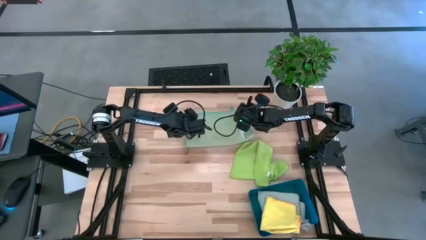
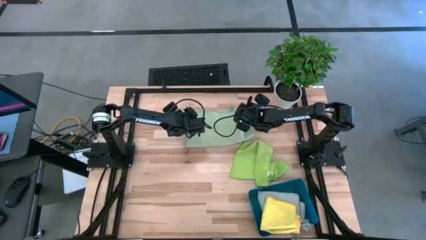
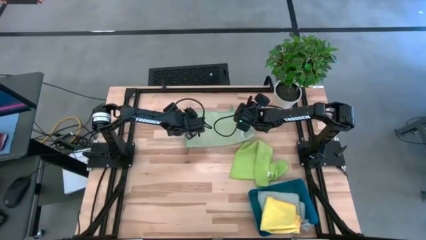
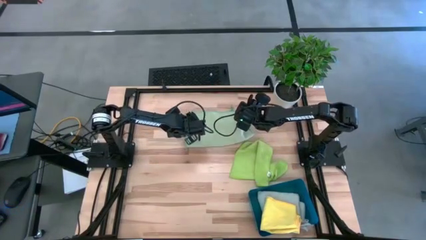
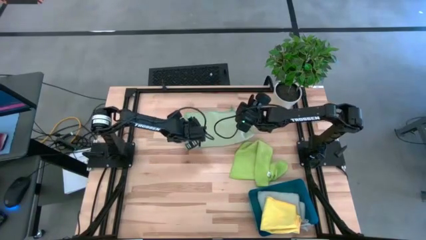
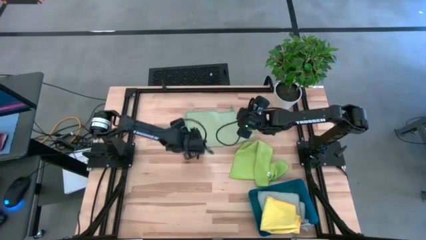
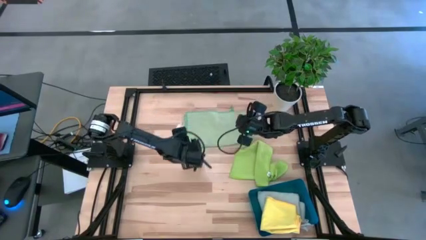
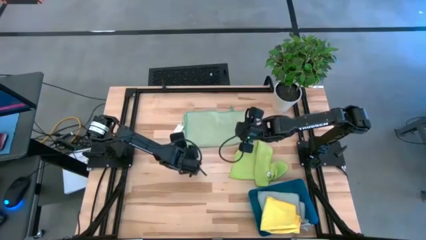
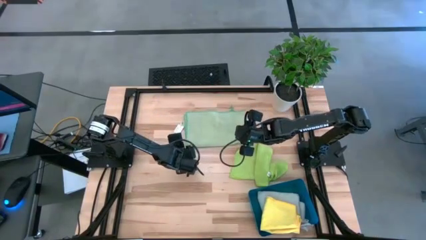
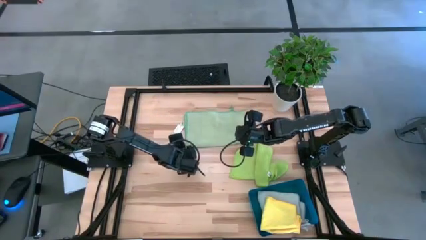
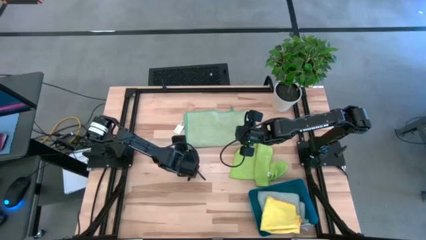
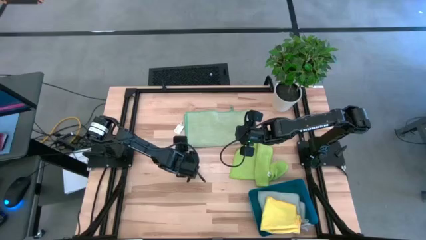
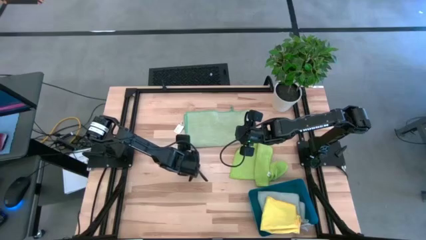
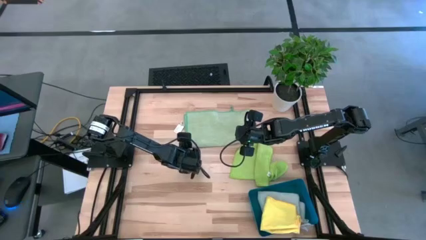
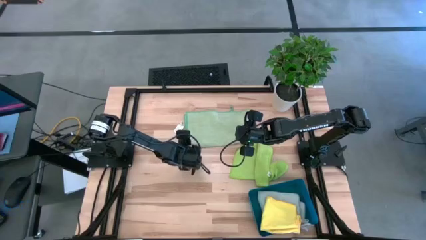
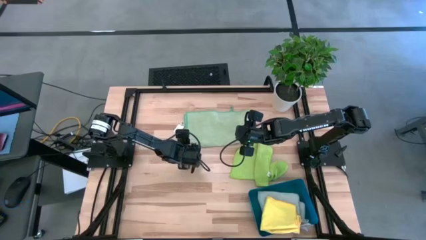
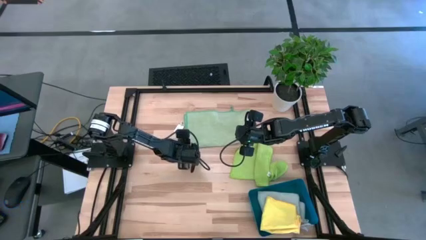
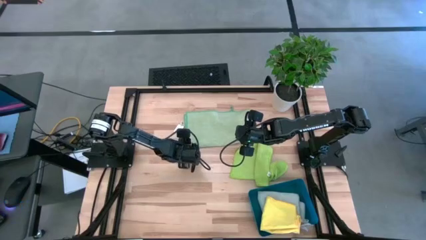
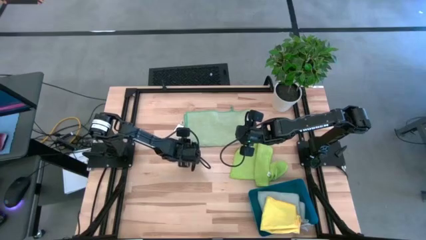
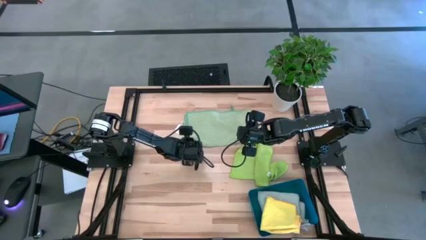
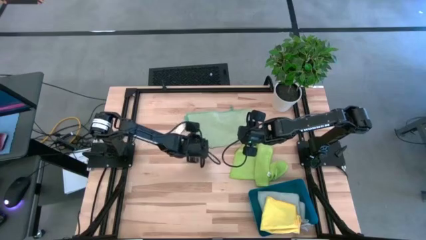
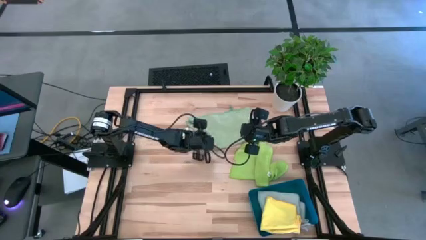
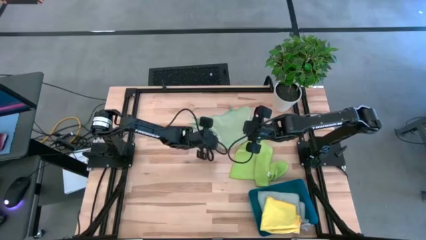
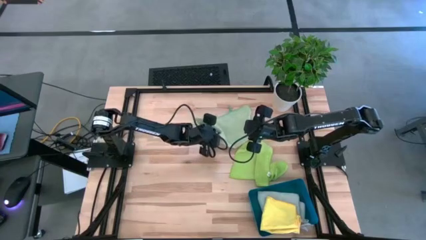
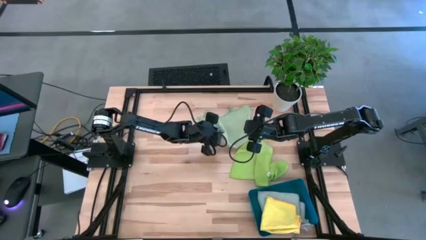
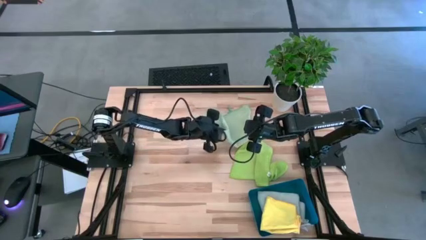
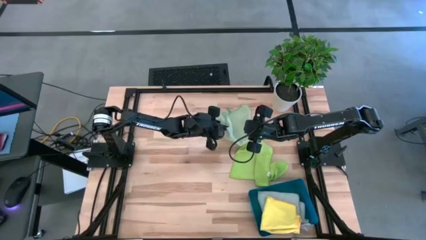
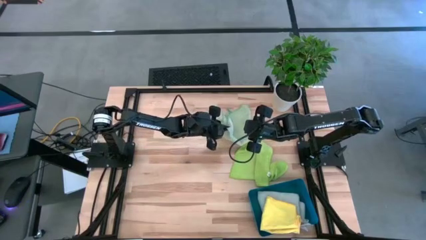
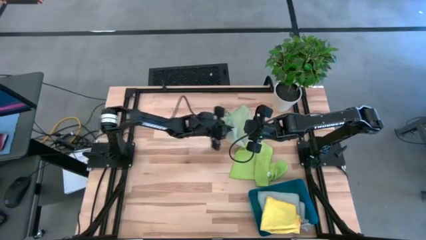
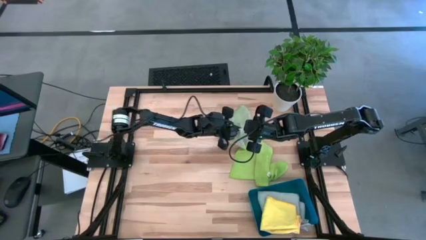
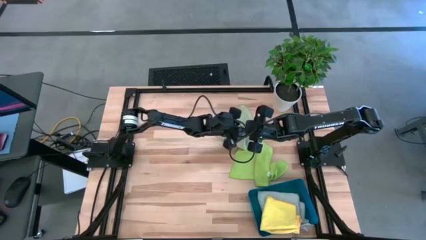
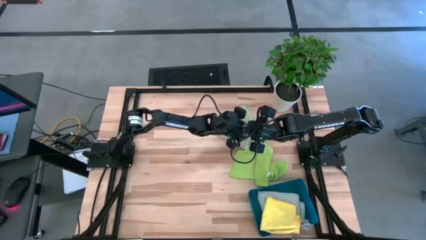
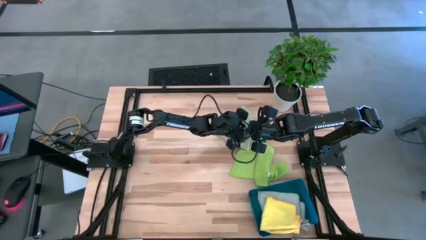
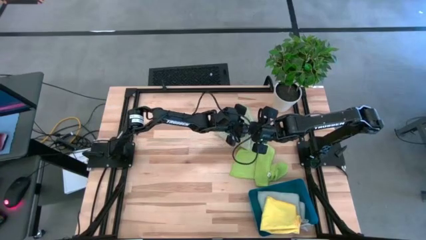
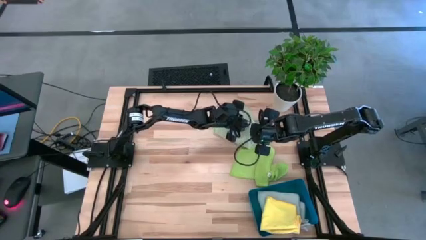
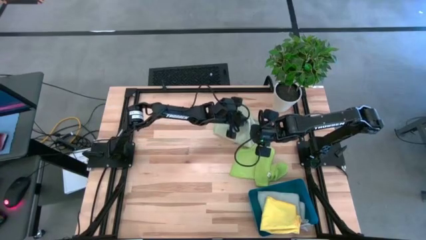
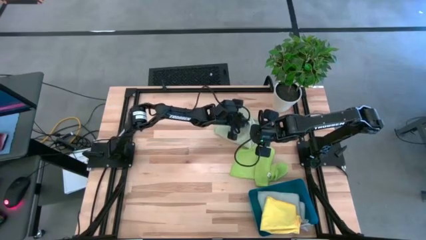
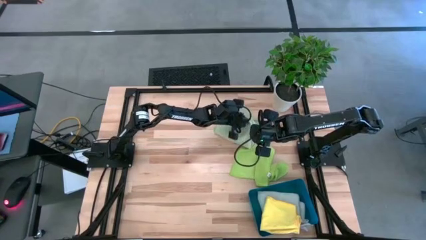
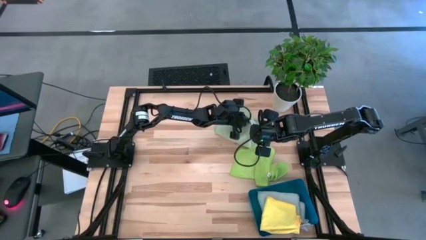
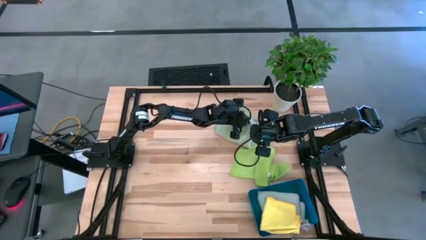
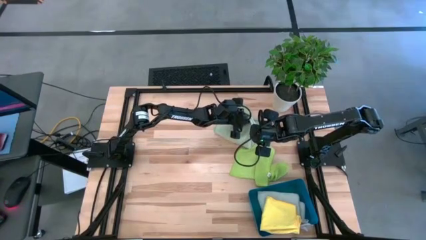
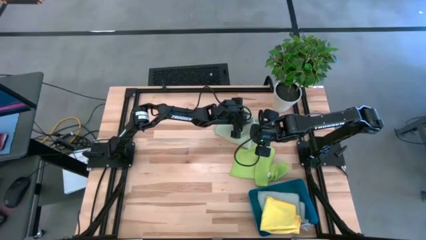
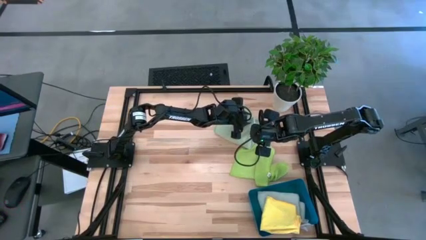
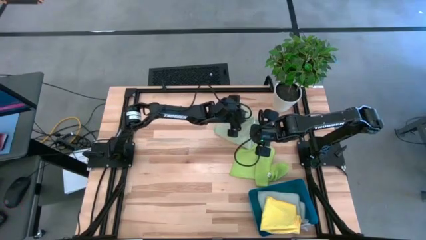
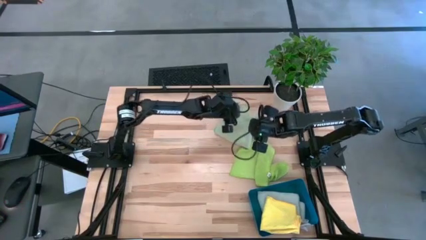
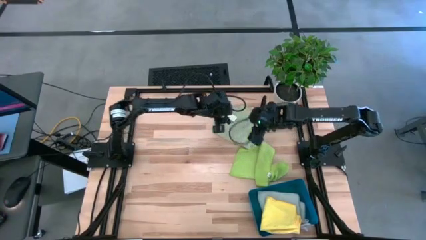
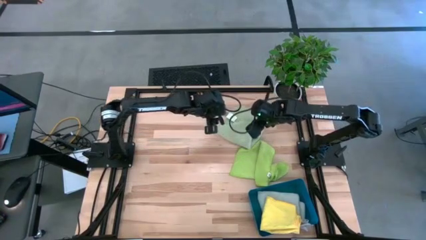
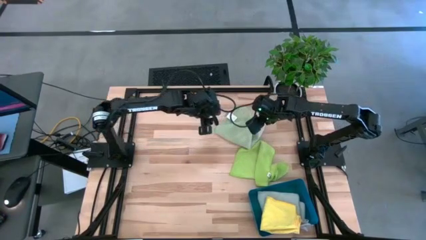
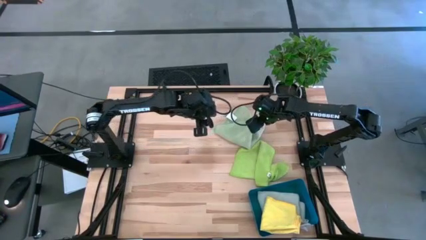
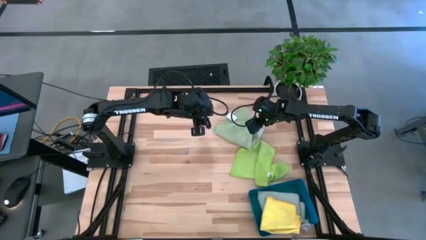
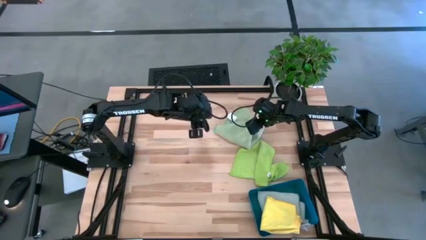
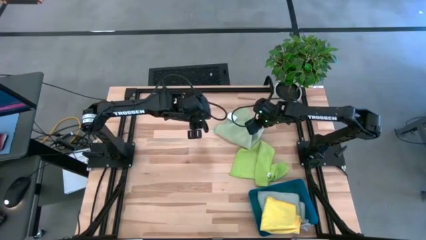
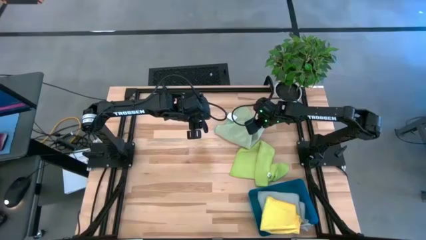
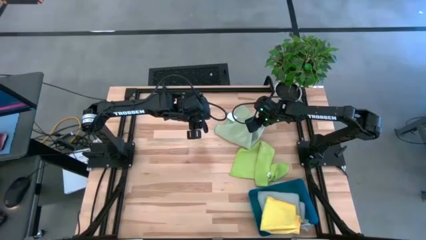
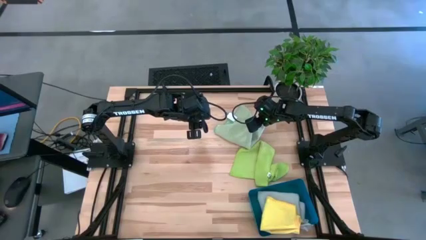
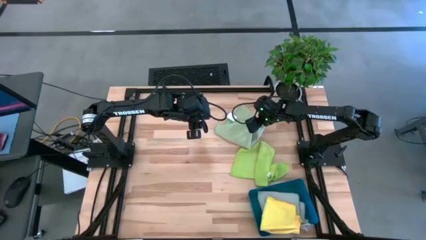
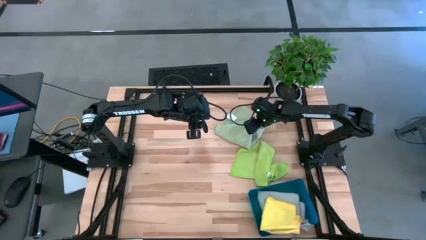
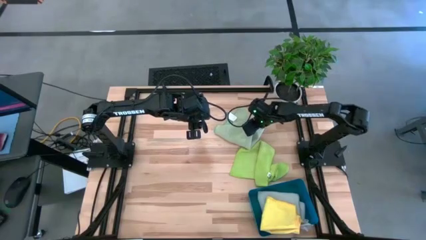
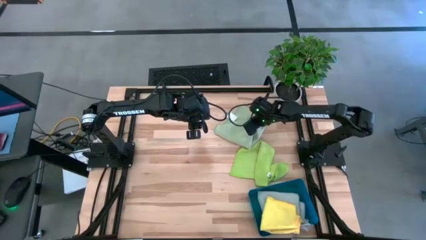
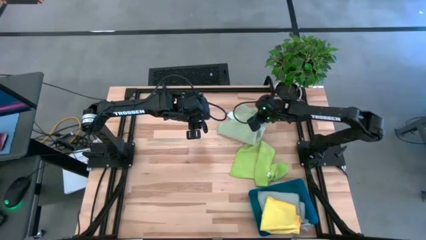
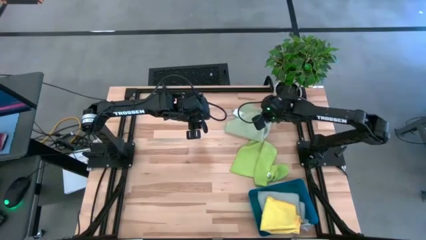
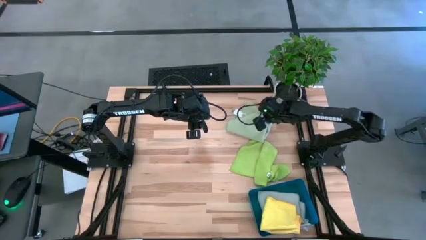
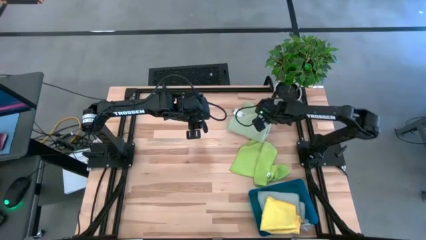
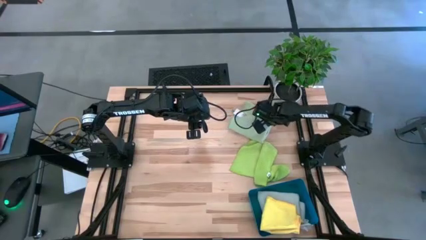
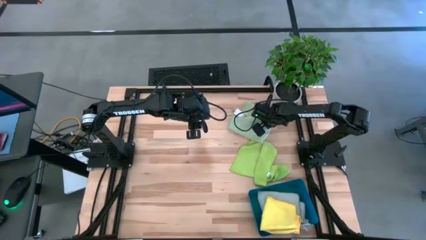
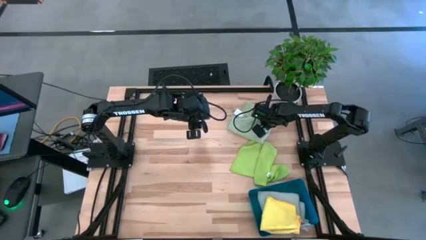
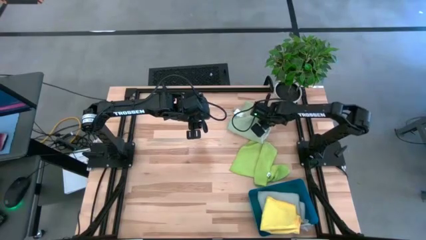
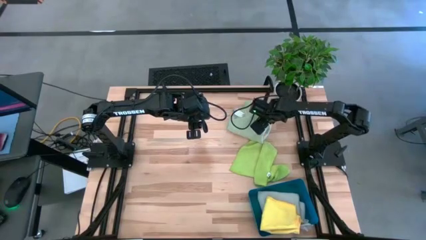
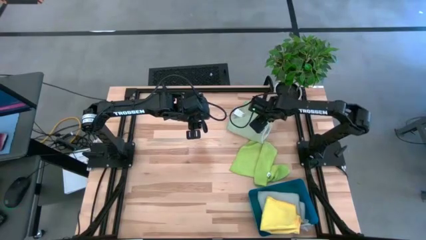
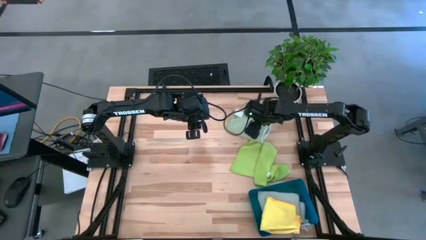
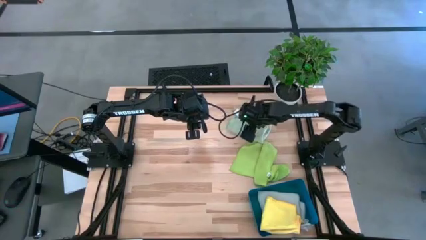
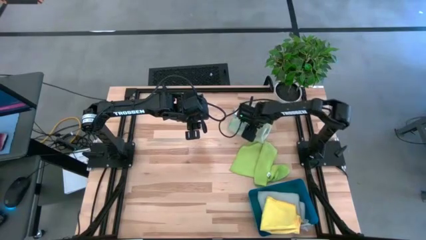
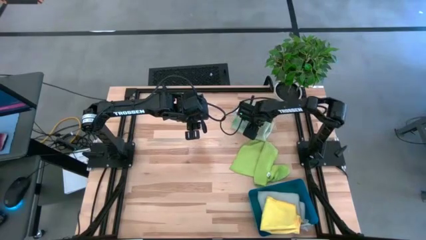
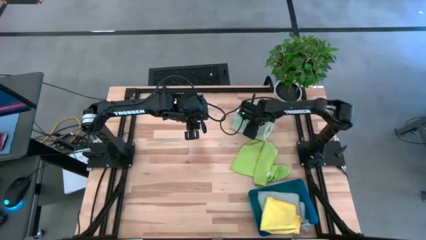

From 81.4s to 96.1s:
Task: Fold microfiber towels
Fold the blue towel
